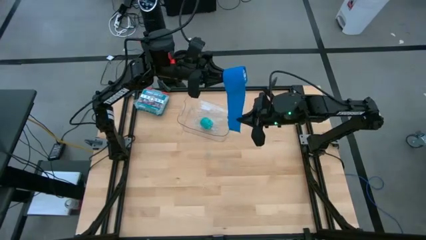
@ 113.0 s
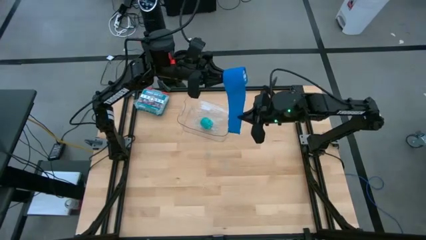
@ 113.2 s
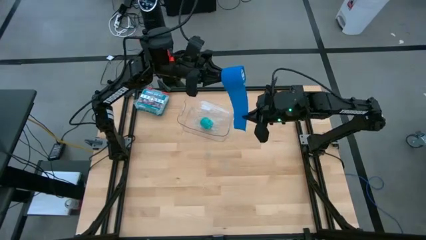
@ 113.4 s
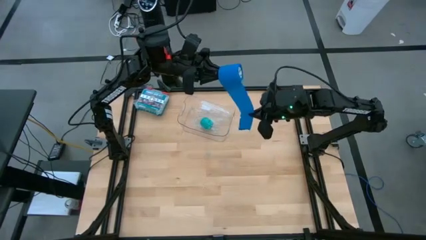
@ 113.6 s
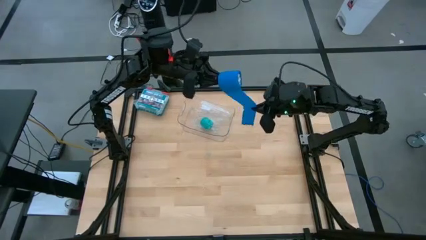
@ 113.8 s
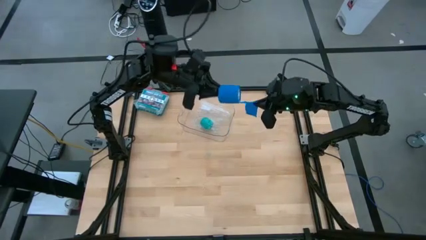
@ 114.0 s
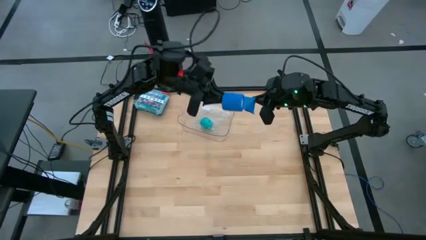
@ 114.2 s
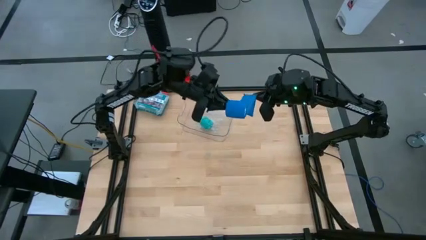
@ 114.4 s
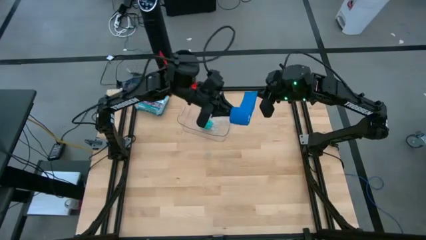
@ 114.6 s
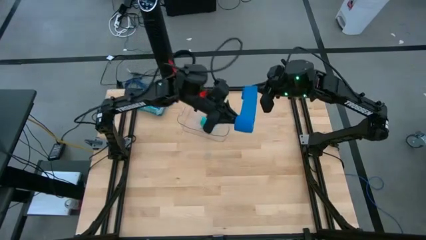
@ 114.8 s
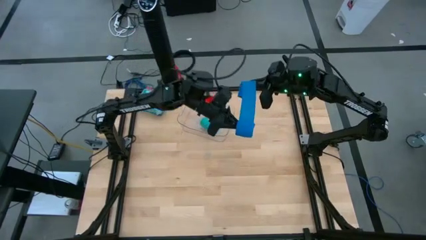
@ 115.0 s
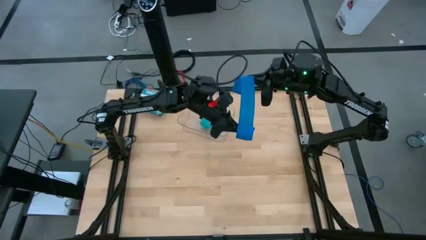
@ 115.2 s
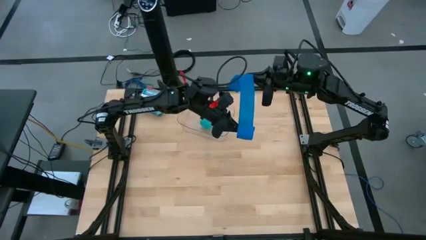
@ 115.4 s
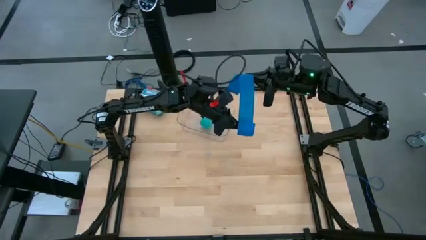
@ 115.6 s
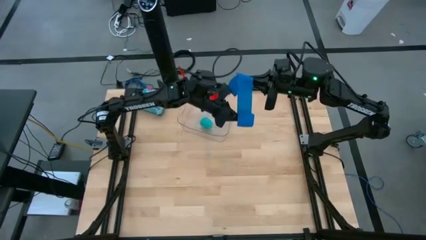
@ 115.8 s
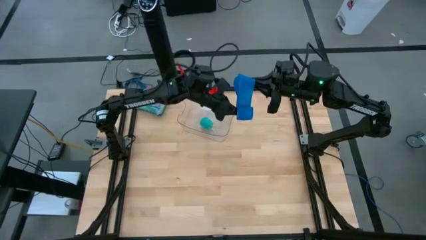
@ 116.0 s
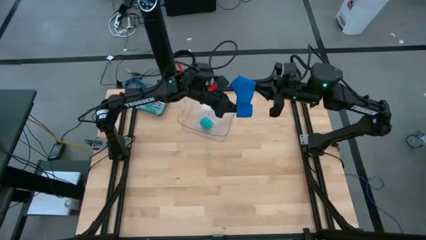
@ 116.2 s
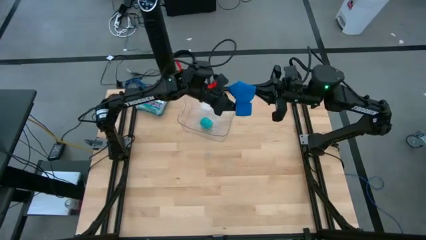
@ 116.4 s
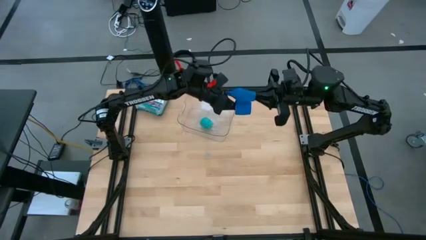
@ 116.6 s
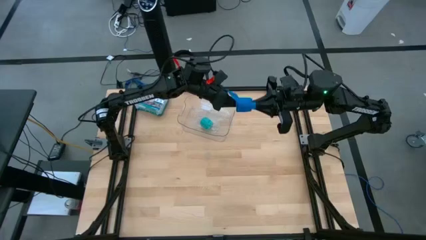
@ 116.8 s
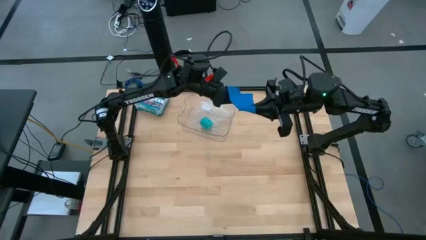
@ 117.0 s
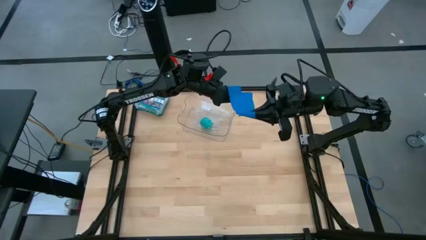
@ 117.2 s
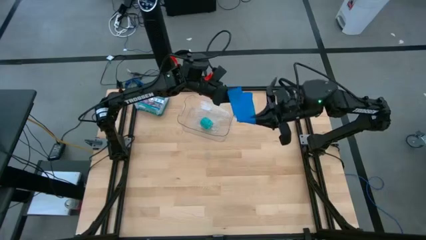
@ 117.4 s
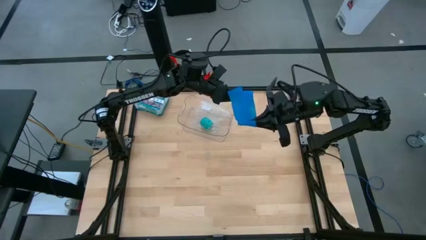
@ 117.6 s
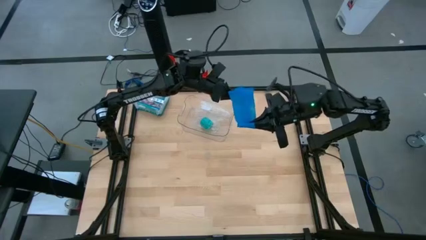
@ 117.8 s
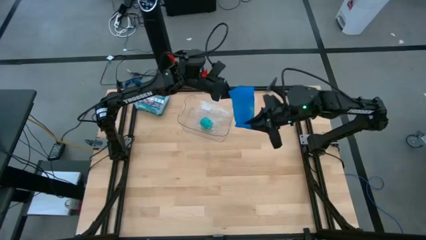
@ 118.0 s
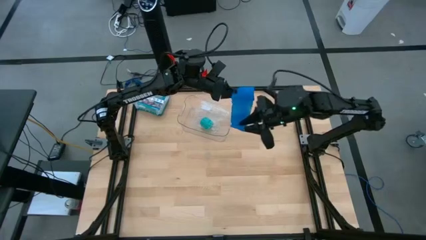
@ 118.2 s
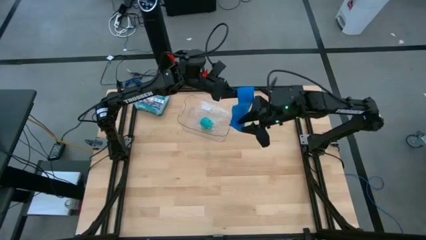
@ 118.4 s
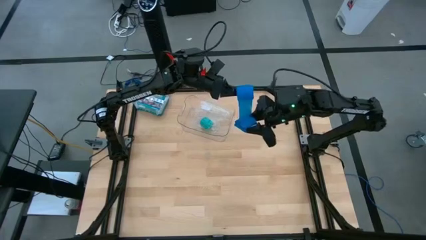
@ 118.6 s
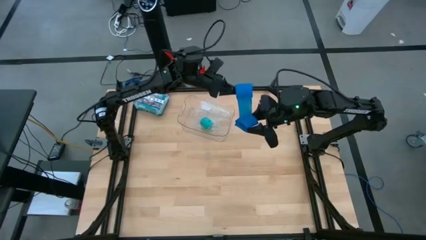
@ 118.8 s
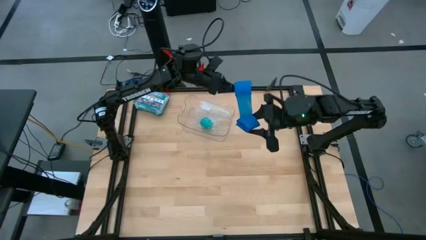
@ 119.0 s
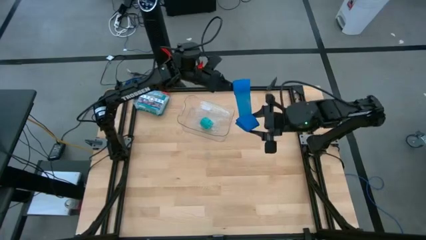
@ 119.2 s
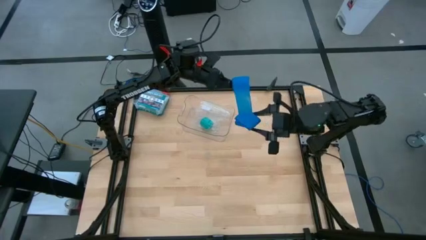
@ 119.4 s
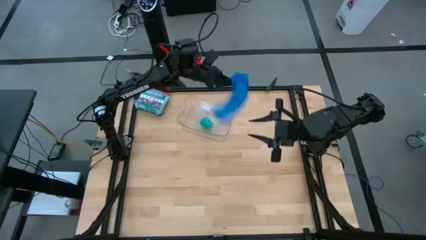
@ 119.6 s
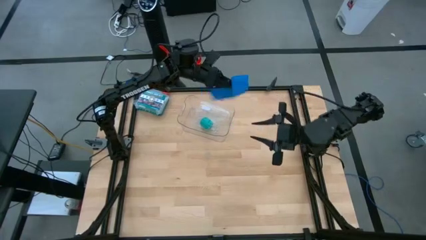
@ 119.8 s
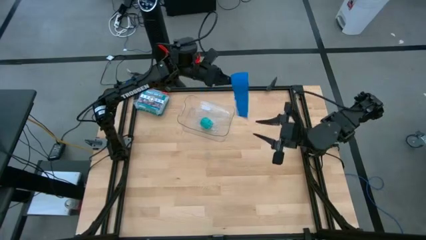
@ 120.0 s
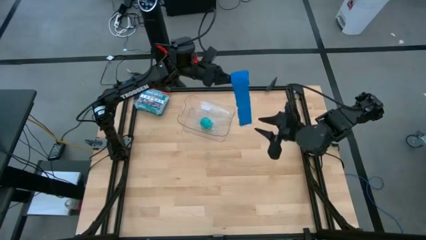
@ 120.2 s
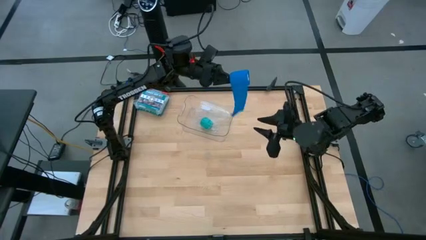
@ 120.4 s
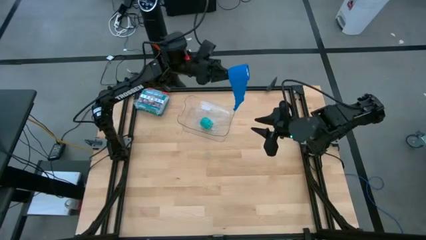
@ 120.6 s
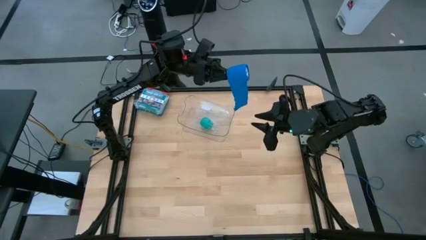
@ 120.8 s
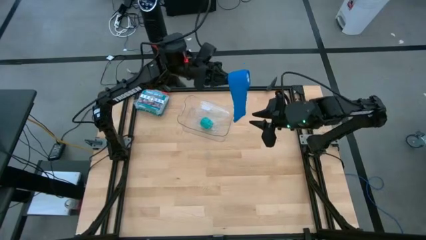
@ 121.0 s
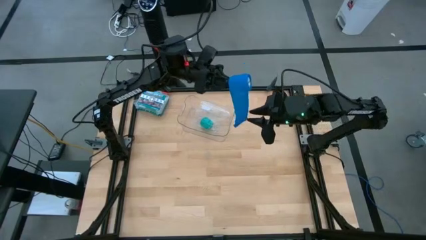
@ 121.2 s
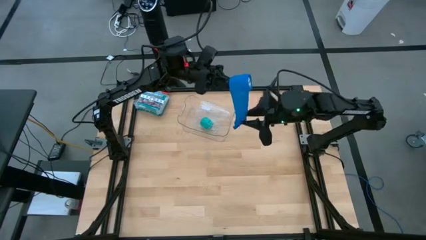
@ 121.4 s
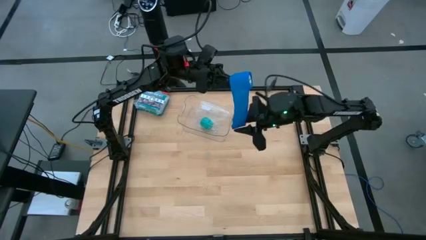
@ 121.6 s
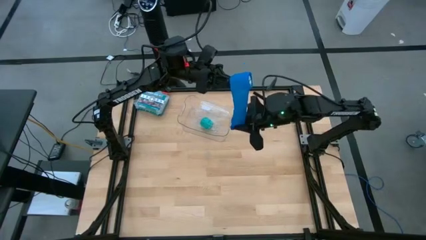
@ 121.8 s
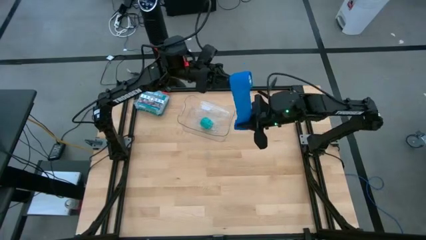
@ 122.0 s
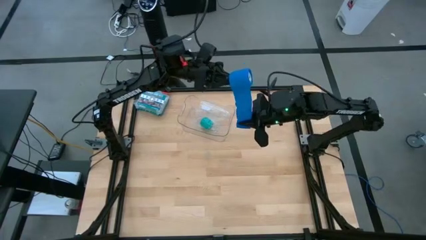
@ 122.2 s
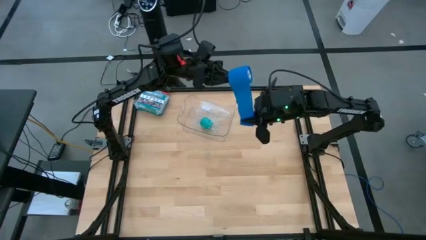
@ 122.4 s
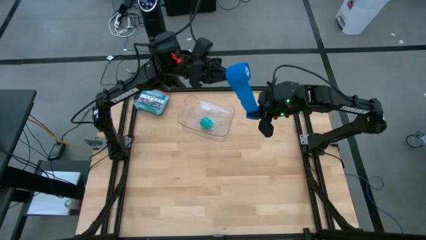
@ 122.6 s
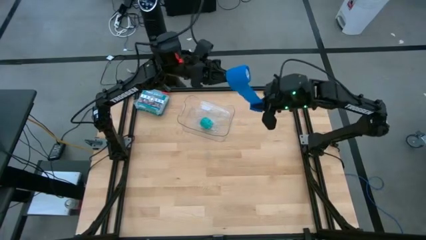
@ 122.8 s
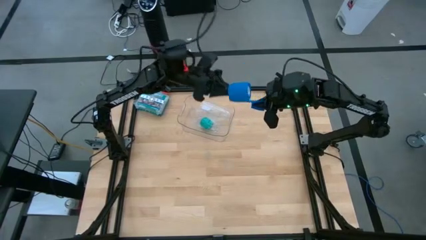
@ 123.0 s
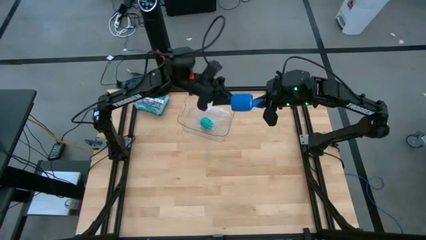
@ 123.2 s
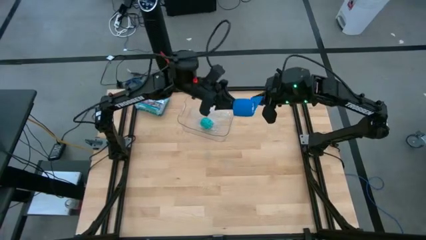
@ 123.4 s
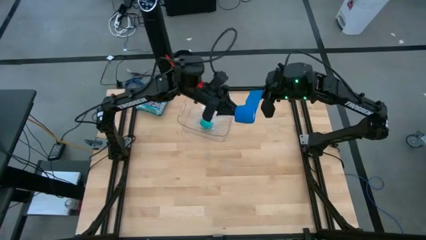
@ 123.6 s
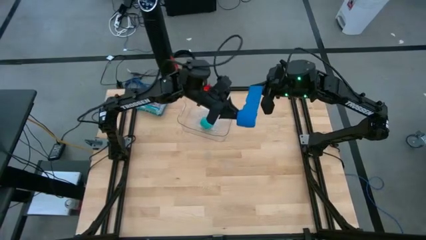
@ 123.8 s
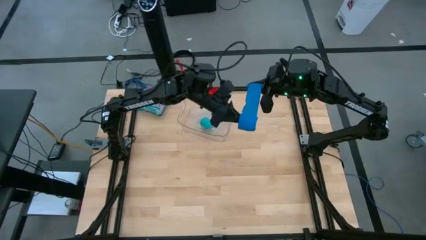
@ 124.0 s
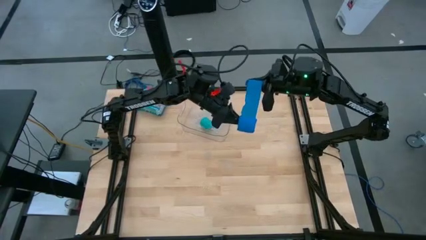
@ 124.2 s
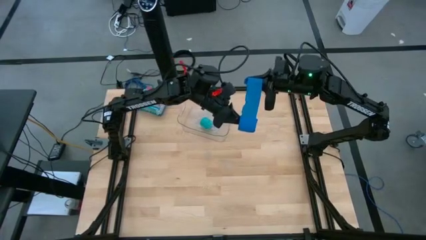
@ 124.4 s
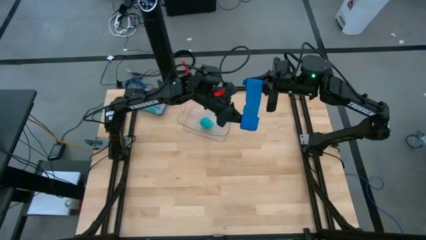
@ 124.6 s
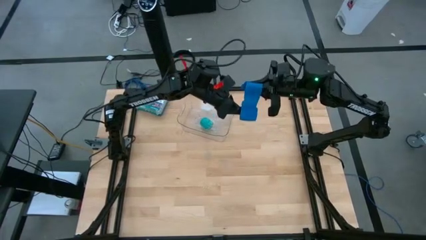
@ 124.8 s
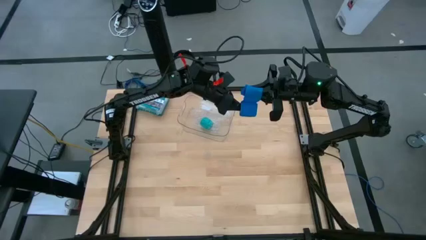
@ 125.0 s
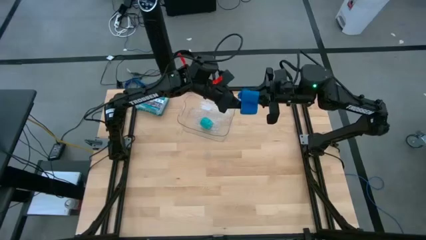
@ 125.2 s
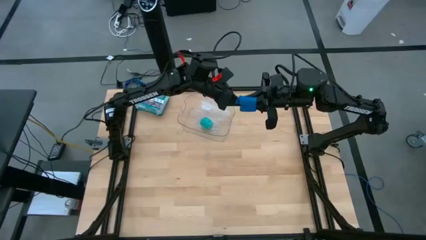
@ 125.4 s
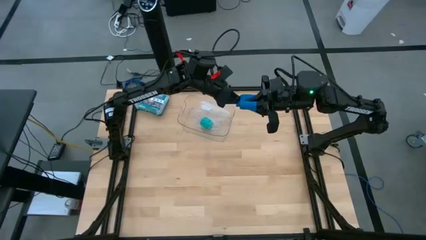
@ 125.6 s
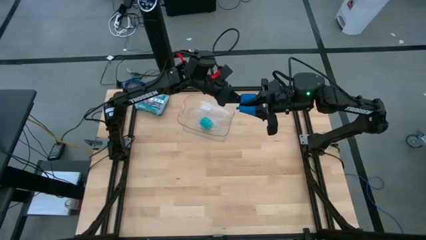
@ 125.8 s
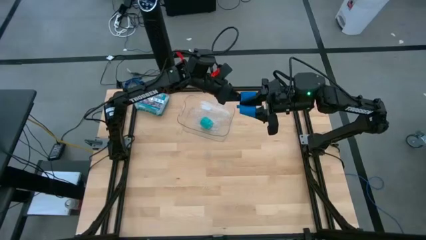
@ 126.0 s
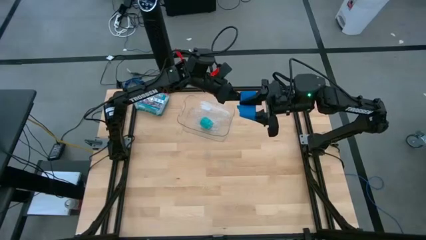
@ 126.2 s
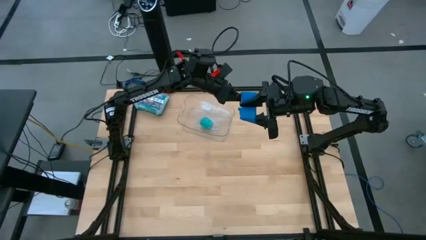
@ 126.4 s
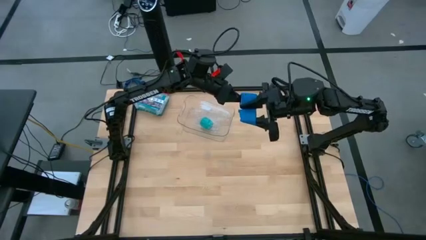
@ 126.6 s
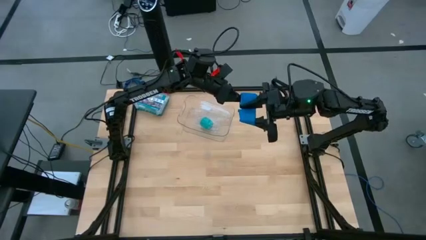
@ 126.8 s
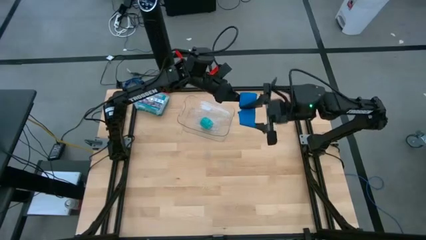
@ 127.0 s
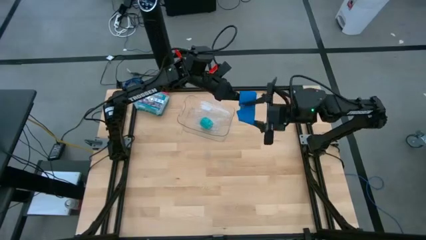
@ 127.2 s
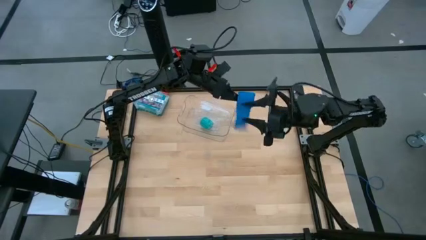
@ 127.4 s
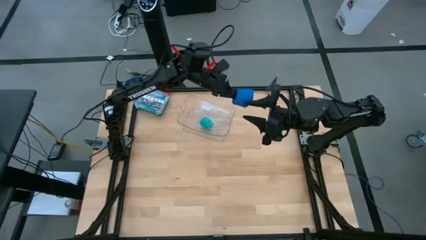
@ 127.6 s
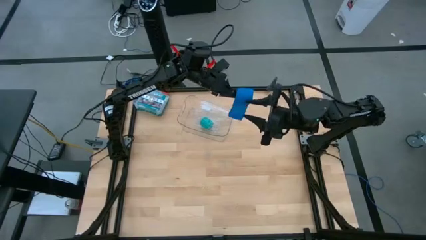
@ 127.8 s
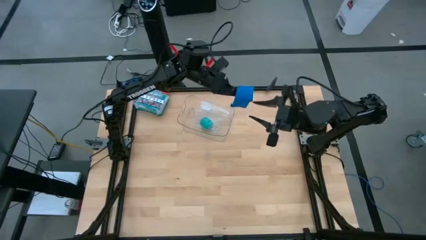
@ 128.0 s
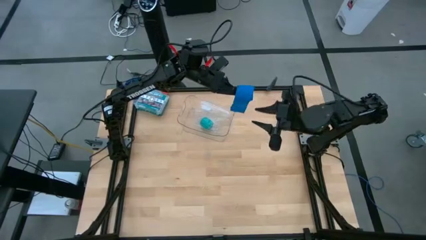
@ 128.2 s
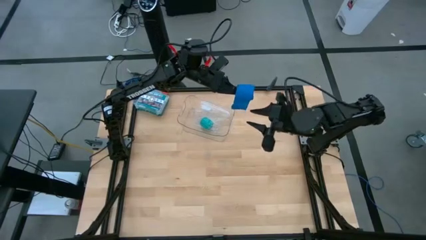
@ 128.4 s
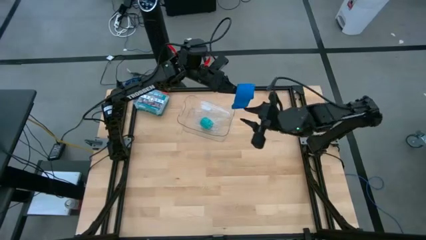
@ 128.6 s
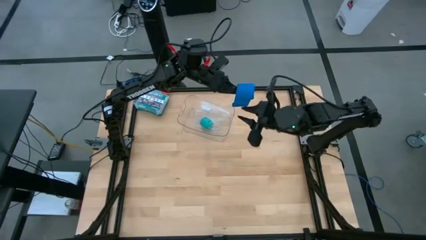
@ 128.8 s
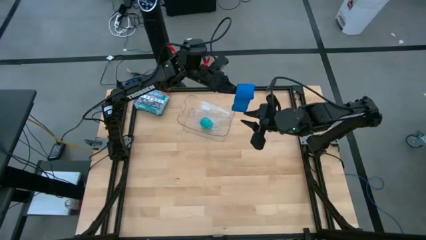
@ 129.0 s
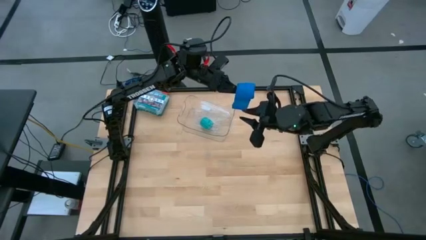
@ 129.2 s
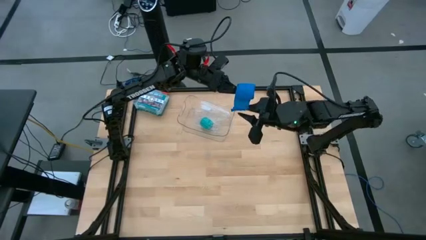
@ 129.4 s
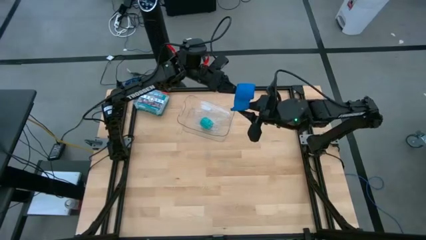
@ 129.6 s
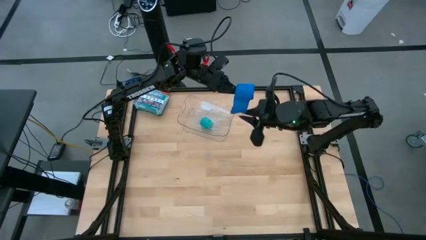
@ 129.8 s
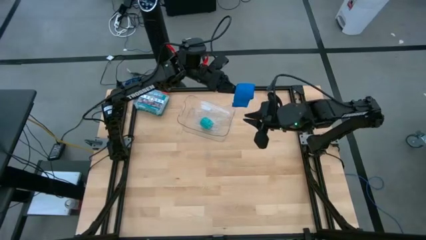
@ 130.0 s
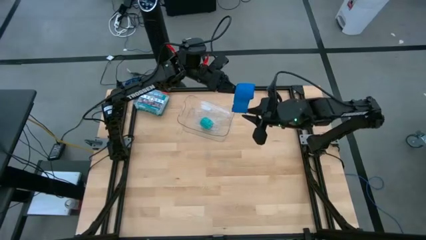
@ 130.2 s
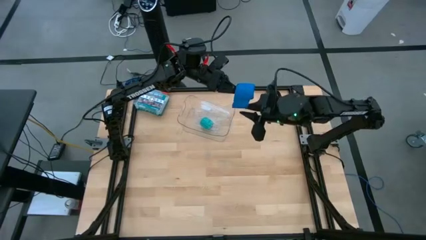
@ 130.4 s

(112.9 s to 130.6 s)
Task: Roll bandage
Roll the blue bandage
